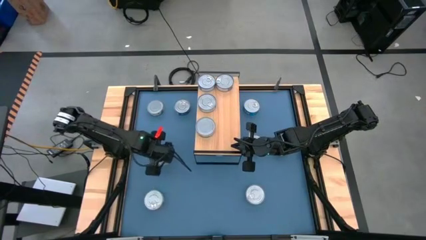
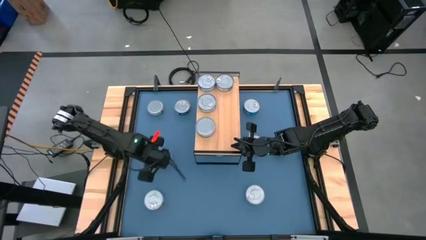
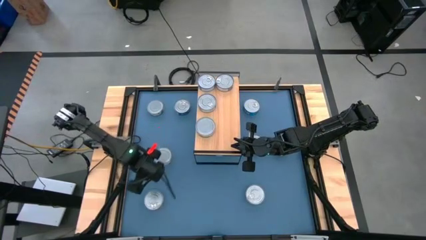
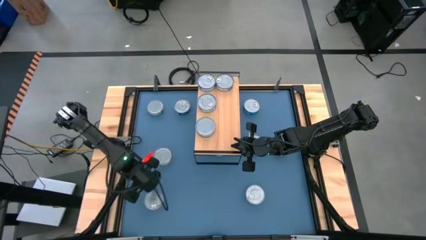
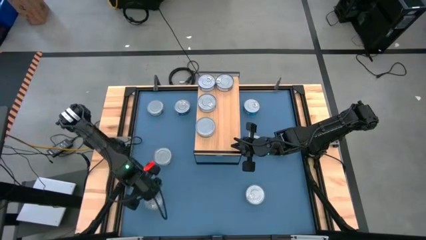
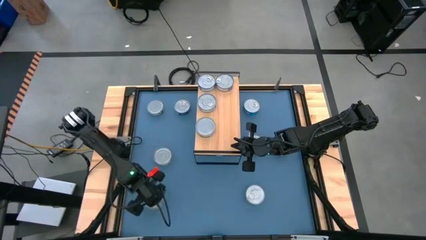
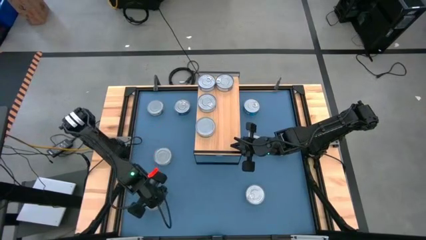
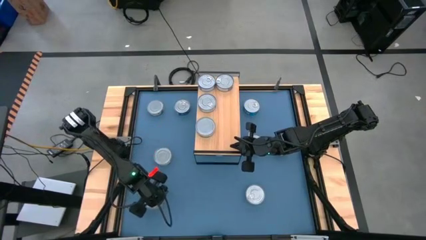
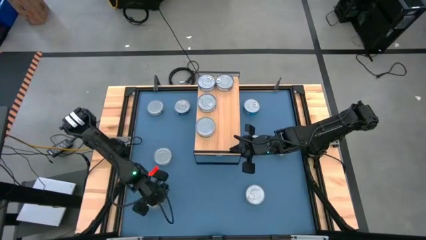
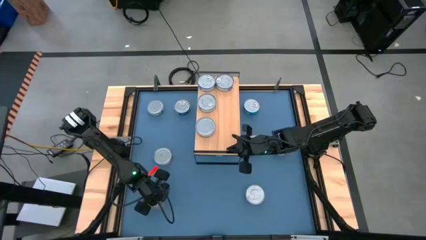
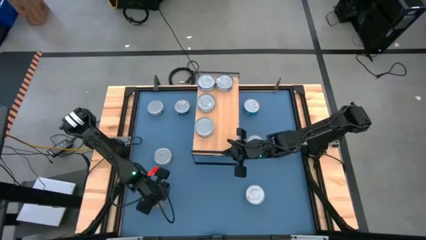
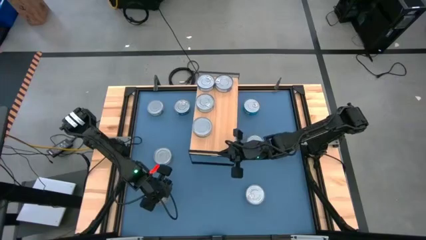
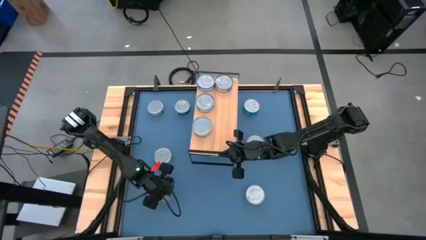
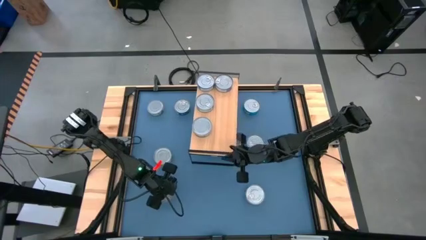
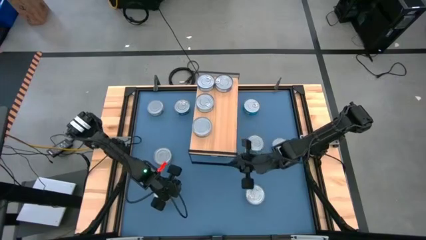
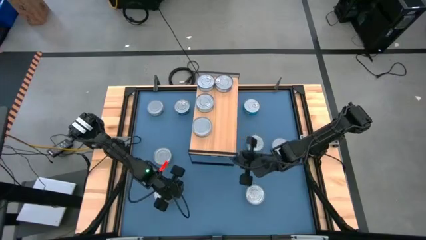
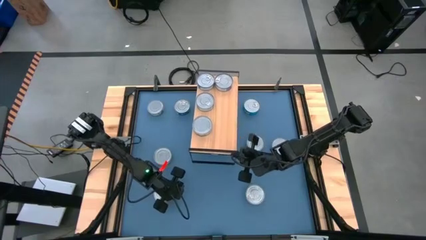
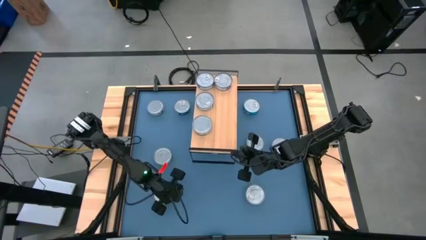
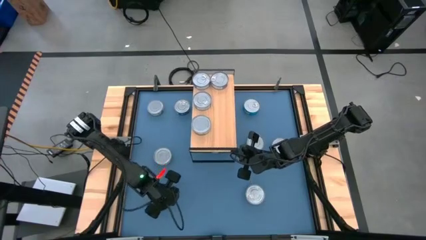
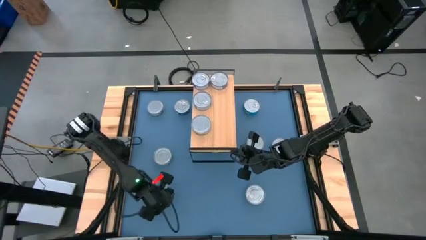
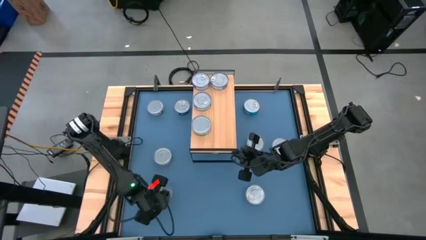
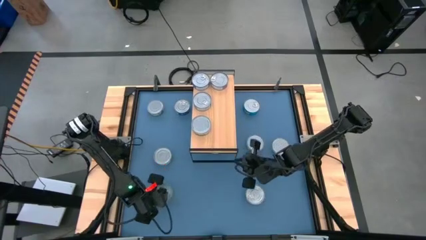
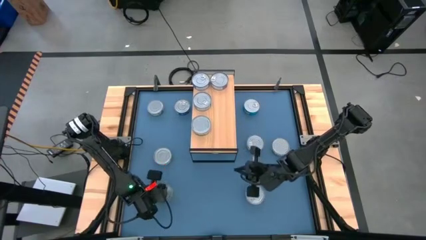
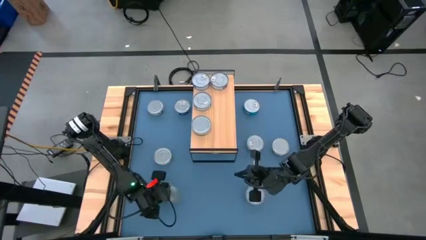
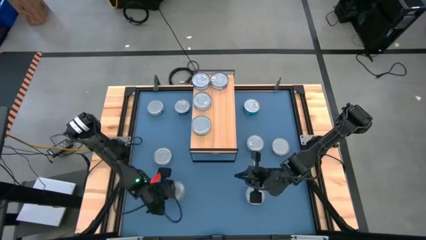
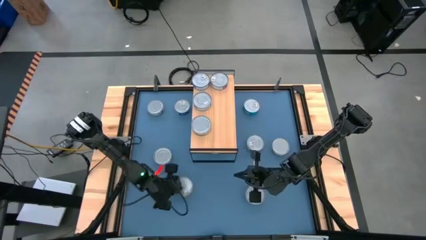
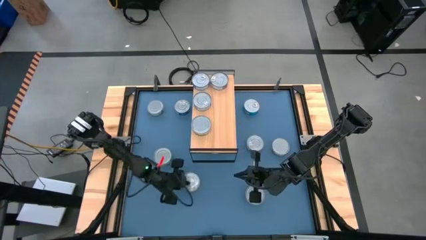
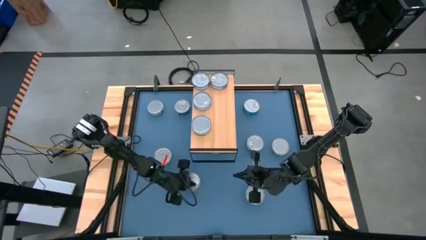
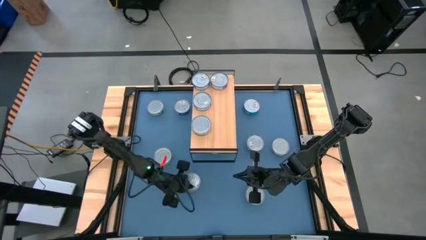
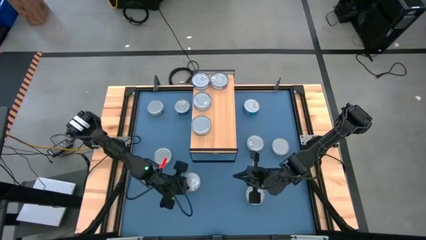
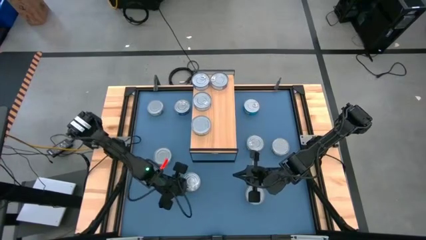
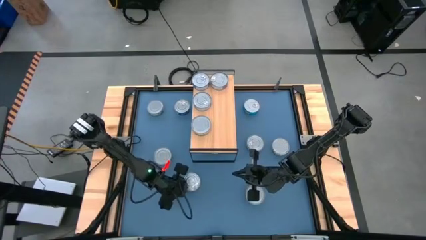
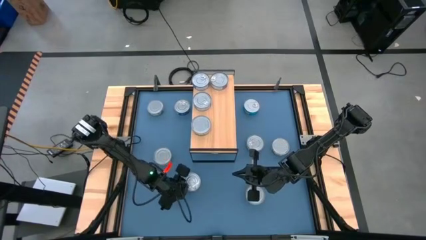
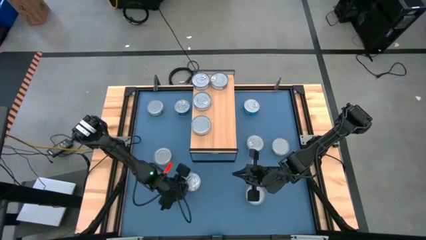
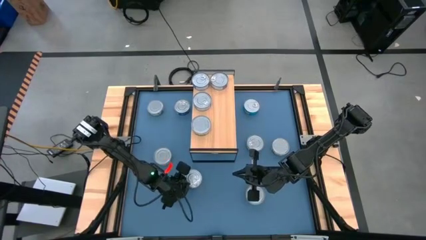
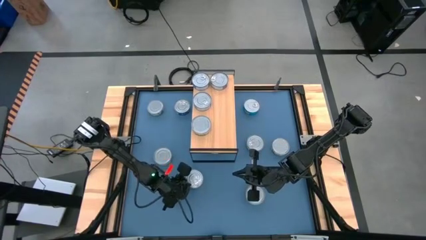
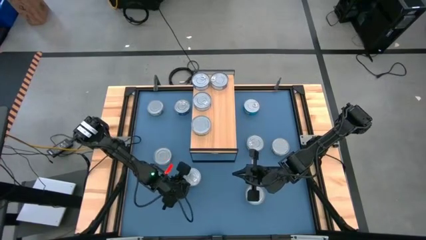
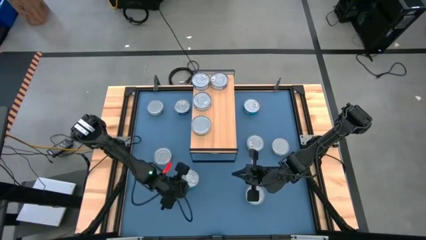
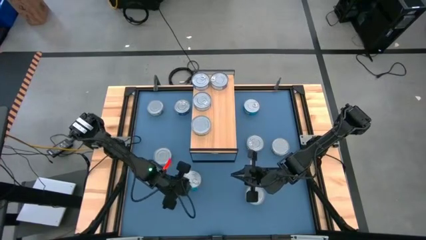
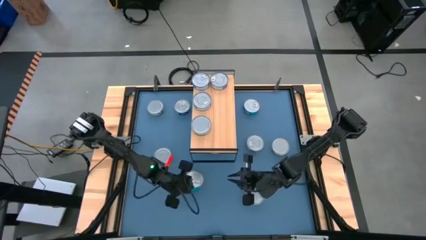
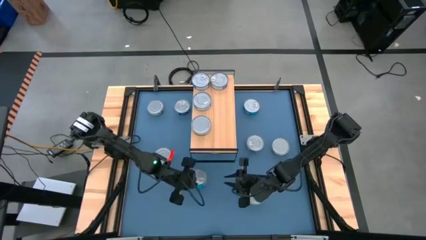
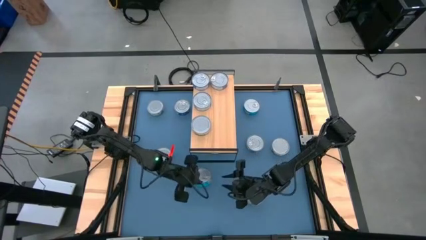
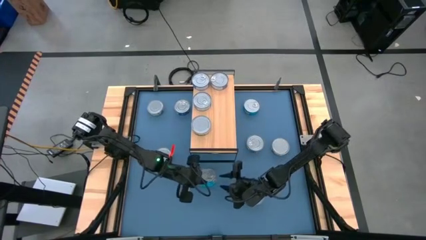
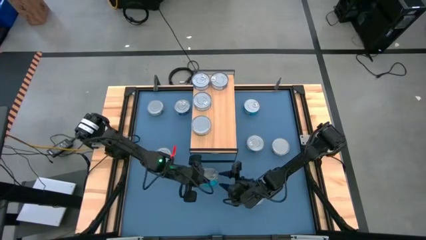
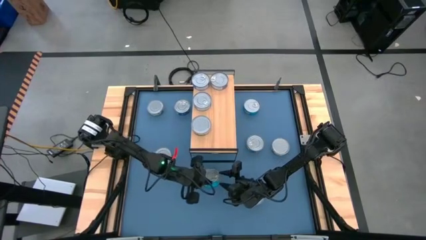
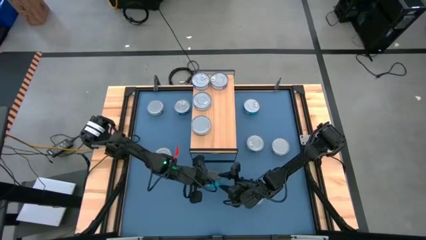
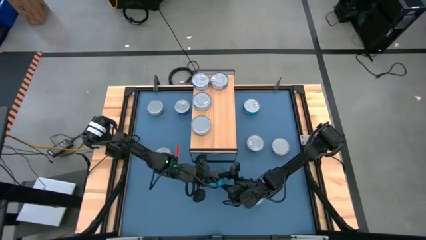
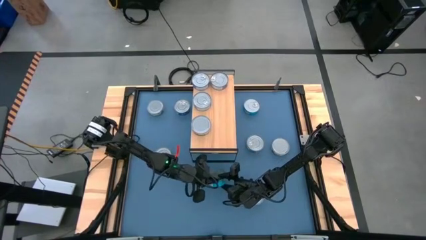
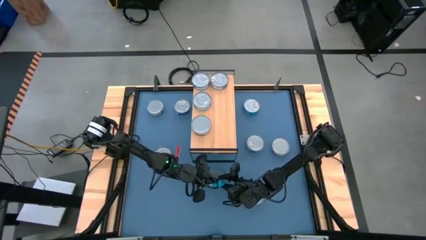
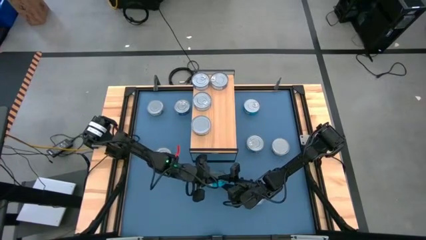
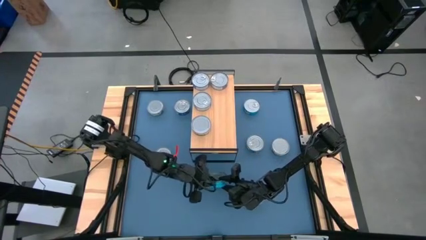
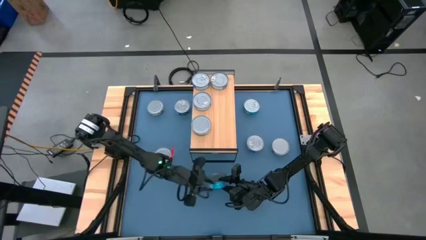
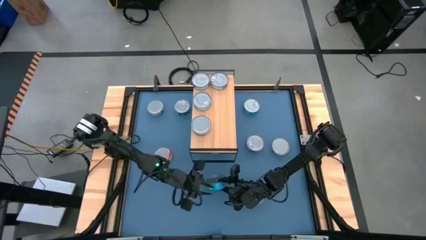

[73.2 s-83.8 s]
Task: Stack canned seafood by type on shelf
Put the yellow-blue tuna can on the shelf

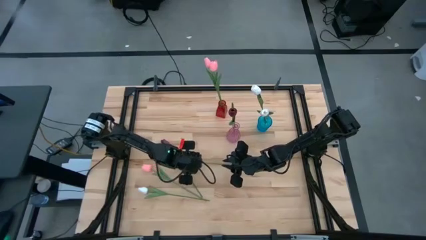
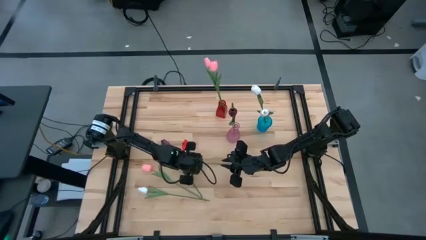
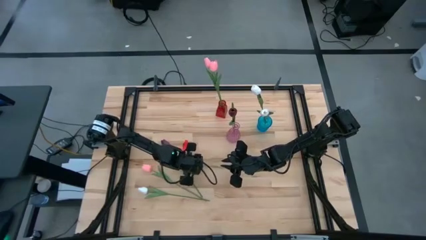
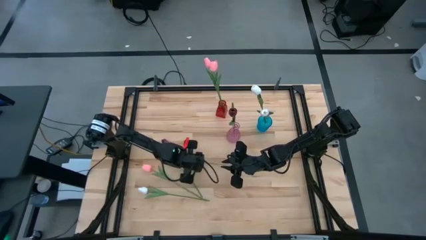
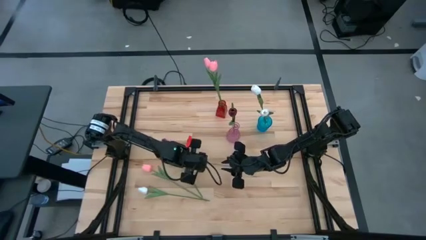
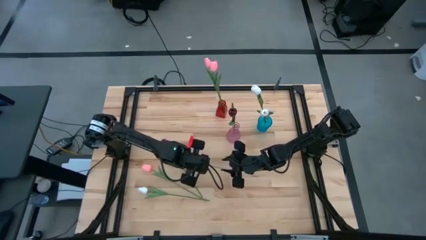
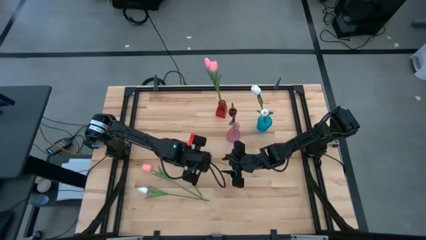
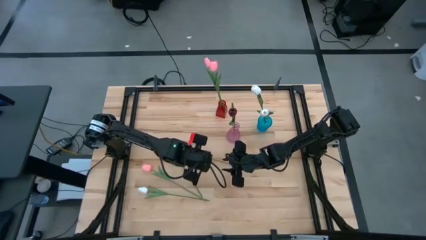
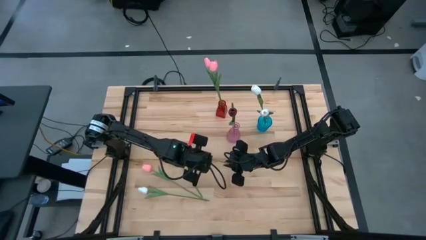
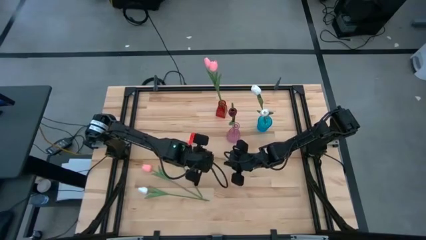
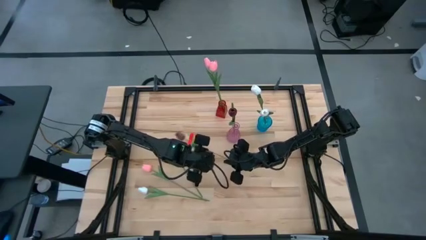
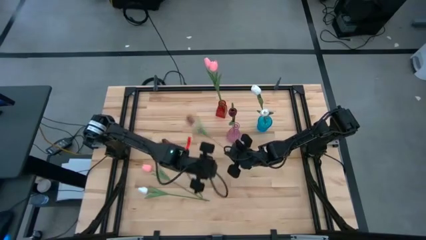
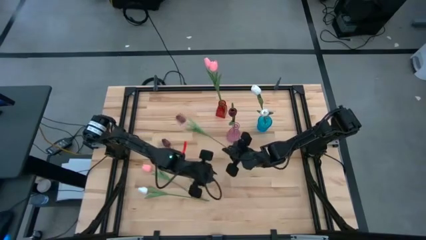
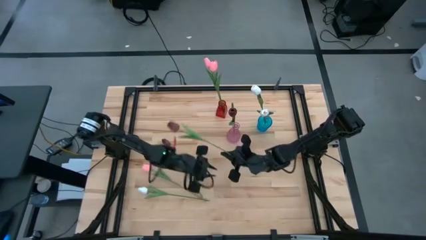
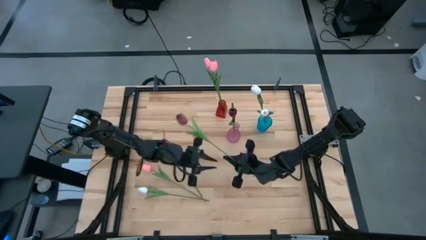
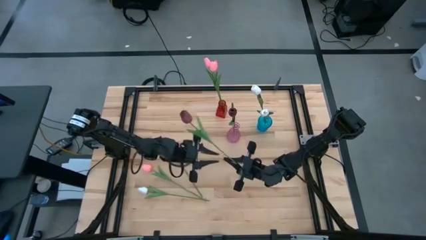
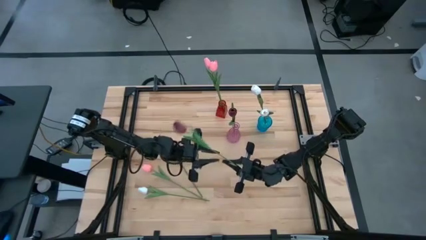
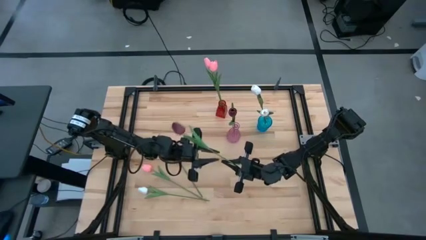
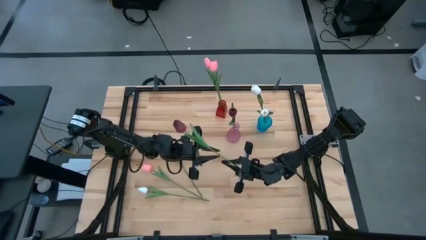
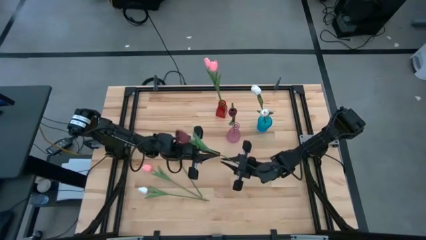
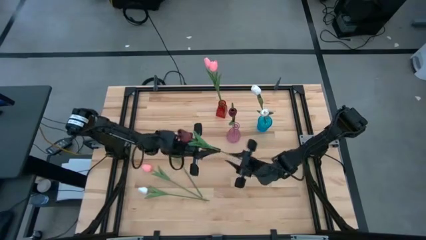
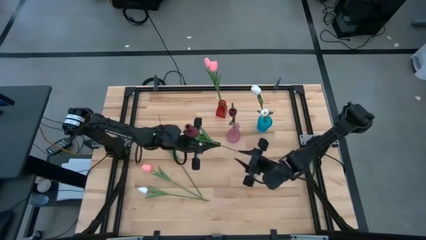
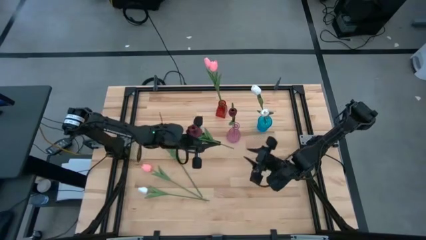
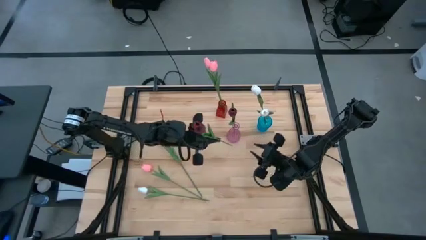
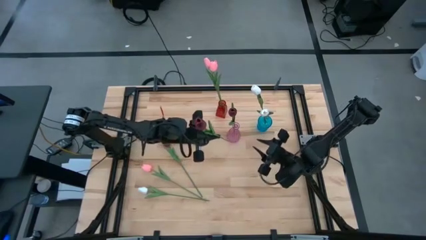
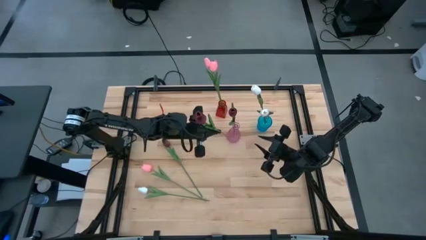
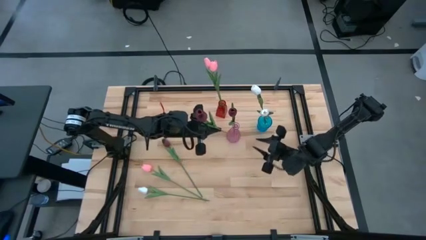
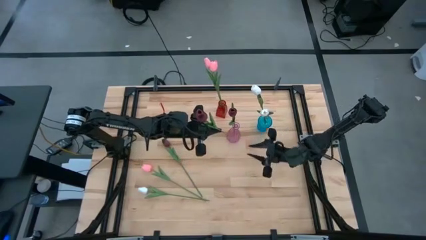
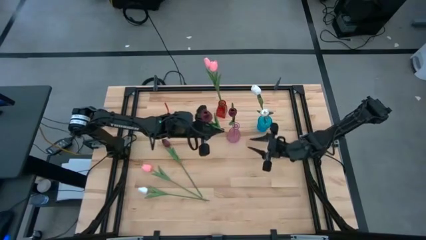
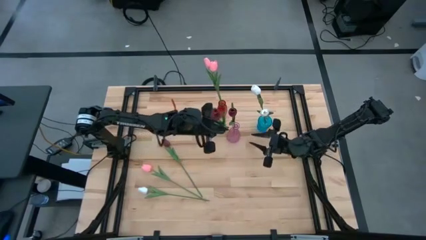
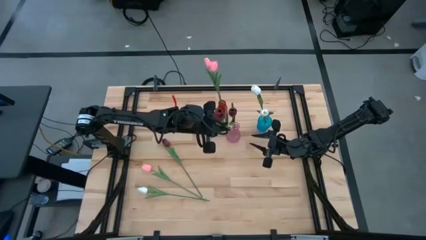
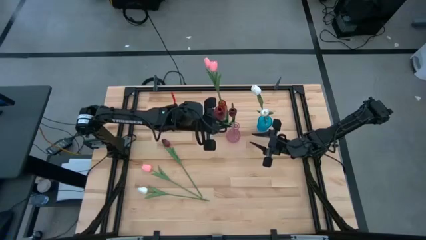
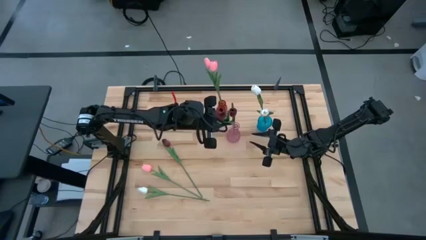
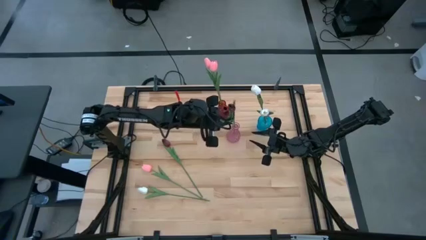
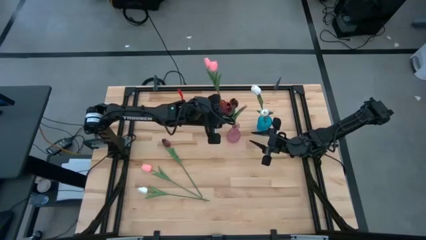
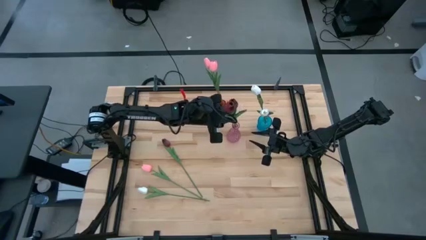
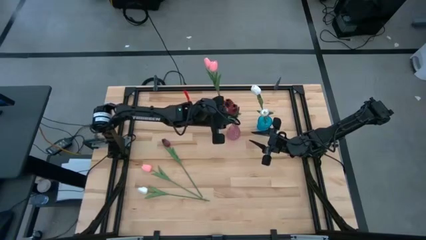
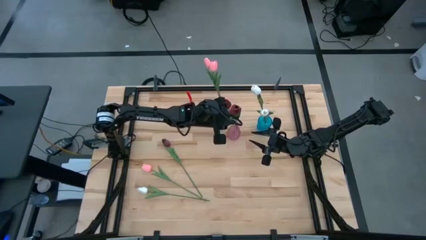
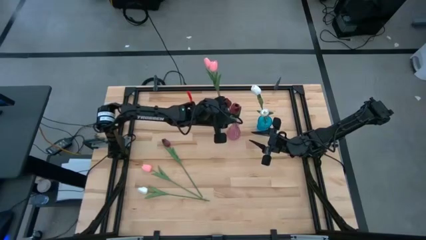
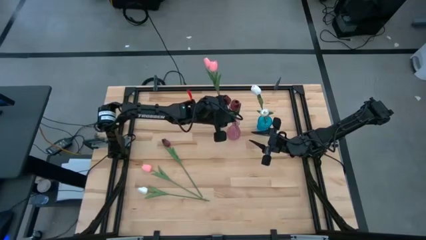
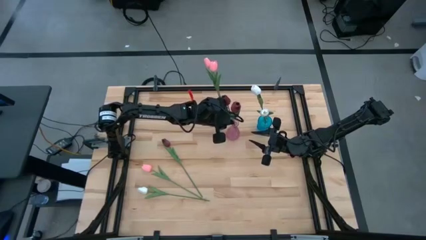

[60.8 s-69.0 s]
Task: Sort flowers into vase by color
Put the bottom red flower into the pink vase
